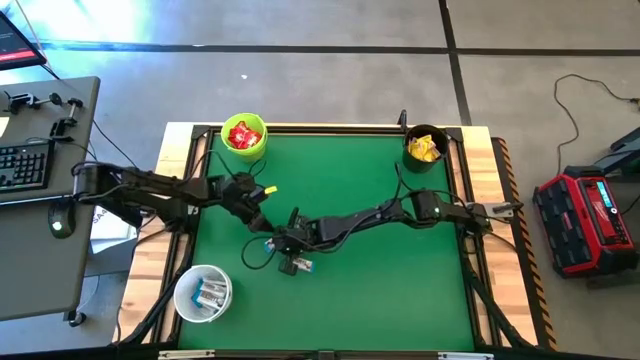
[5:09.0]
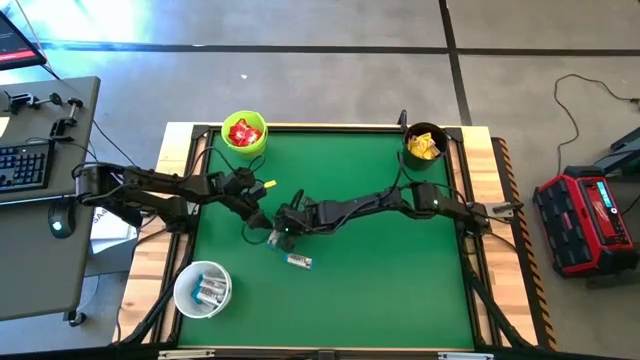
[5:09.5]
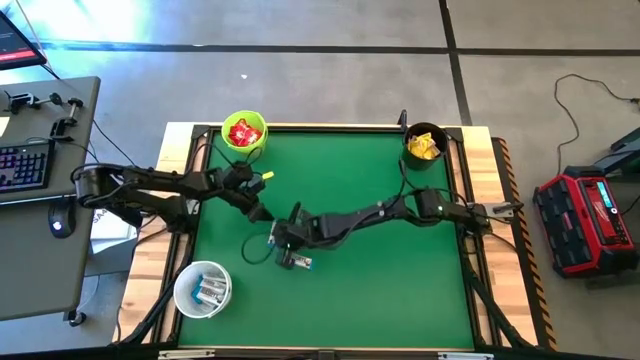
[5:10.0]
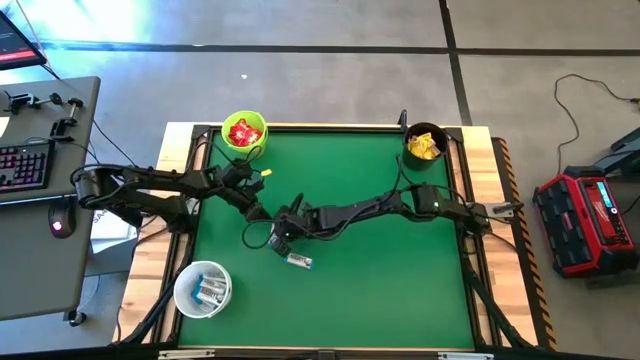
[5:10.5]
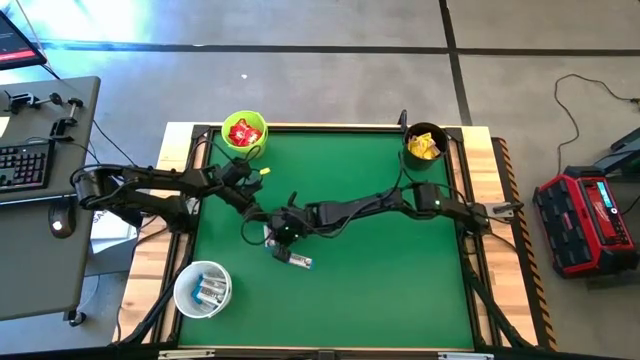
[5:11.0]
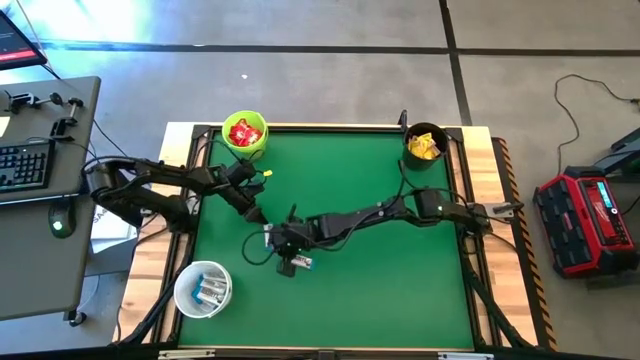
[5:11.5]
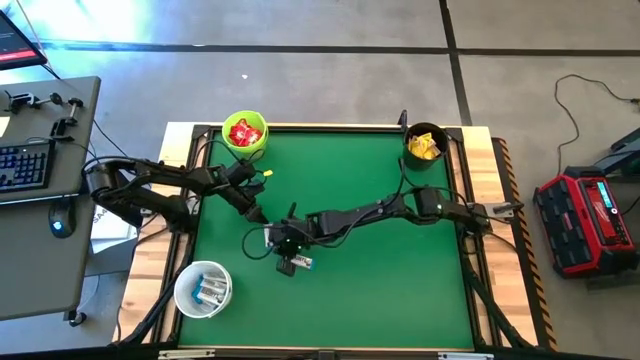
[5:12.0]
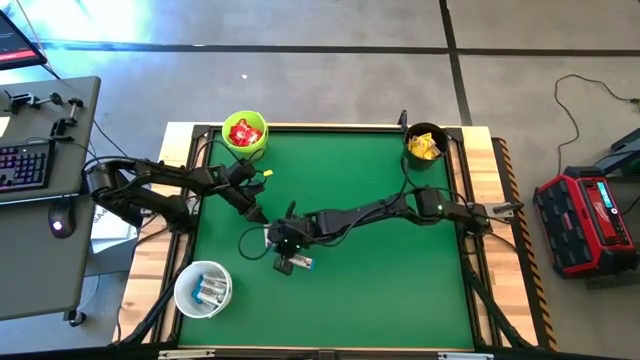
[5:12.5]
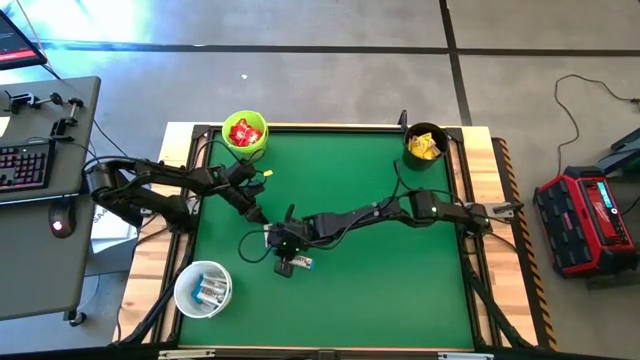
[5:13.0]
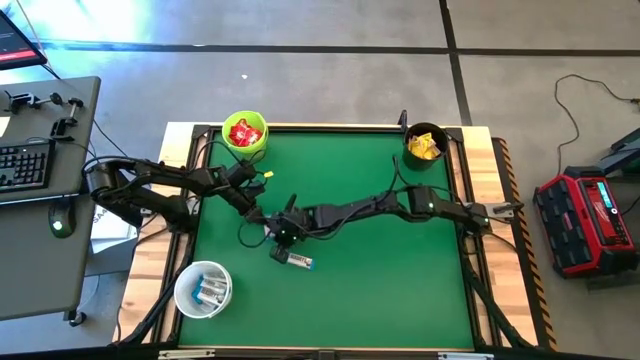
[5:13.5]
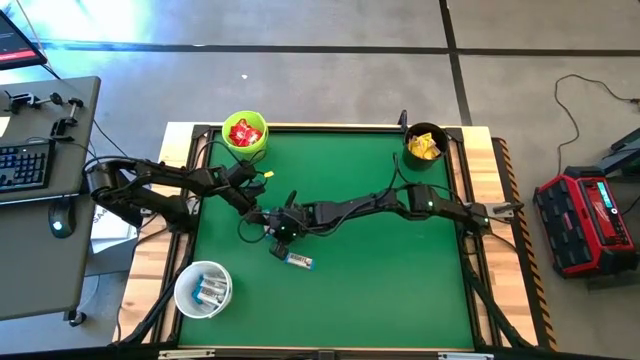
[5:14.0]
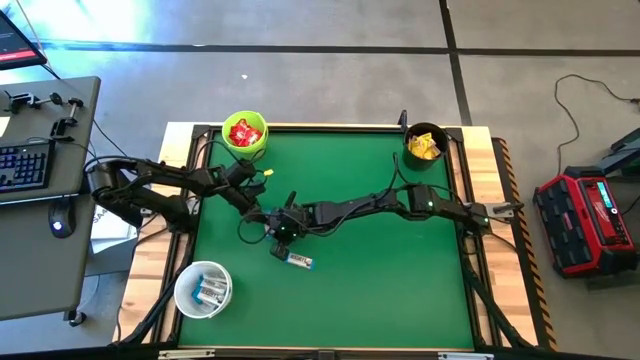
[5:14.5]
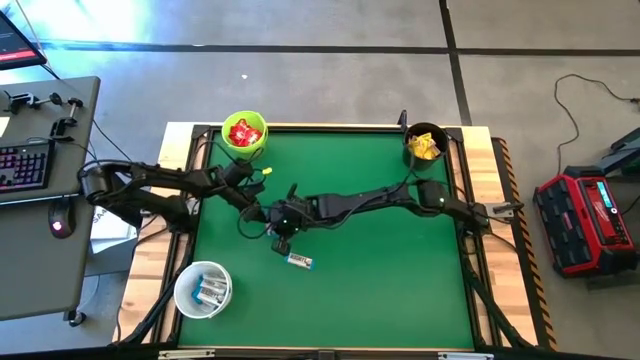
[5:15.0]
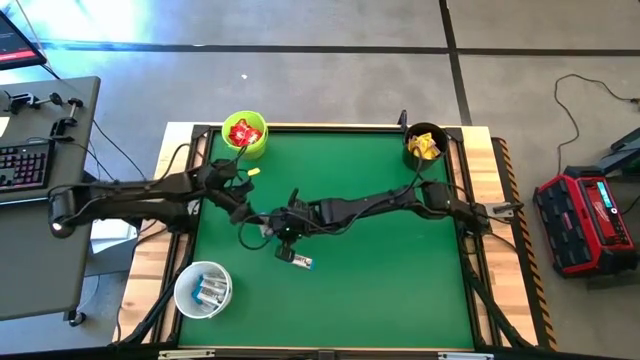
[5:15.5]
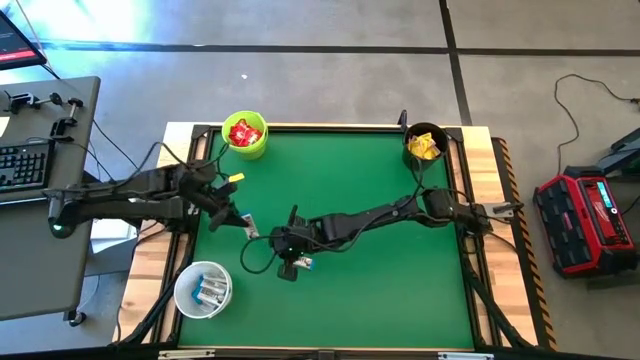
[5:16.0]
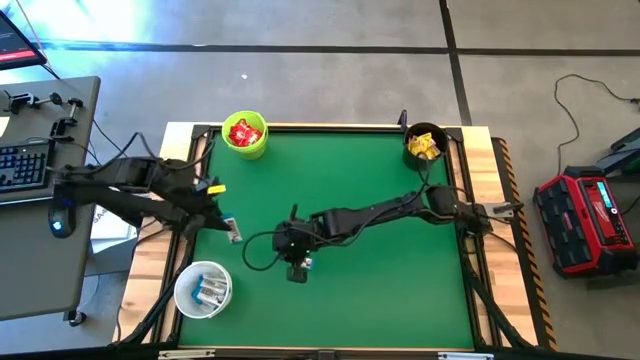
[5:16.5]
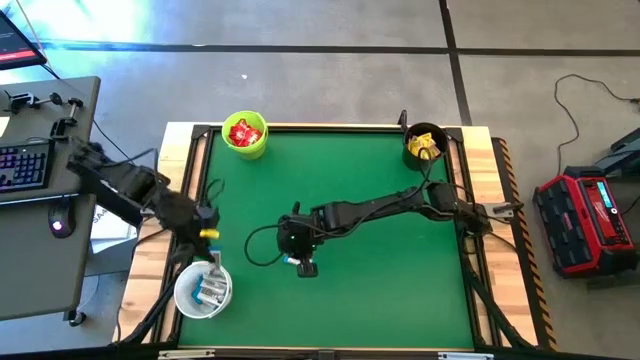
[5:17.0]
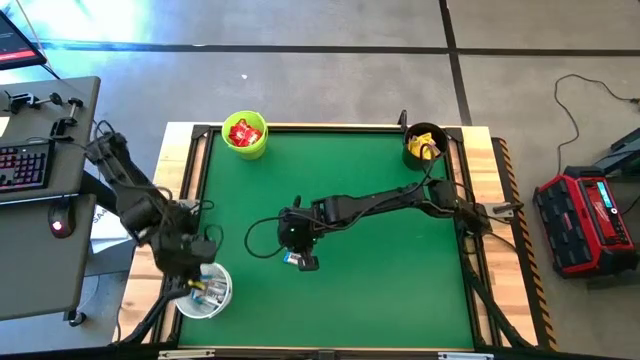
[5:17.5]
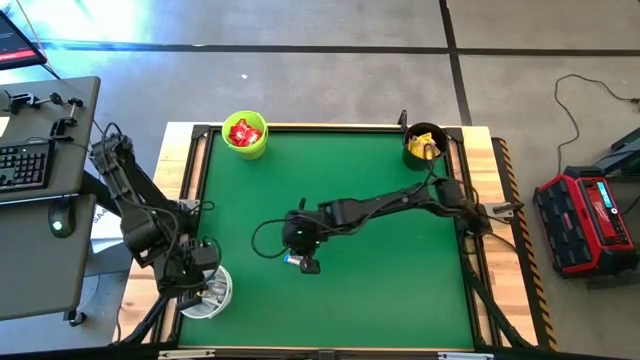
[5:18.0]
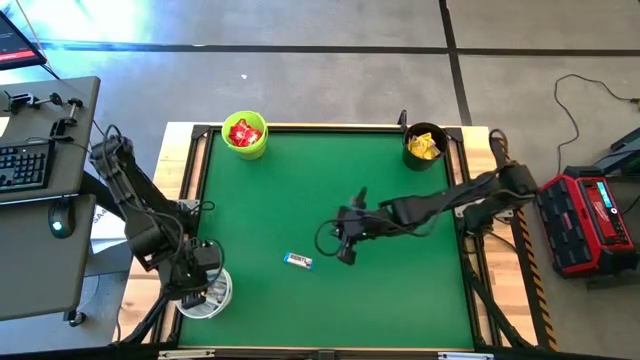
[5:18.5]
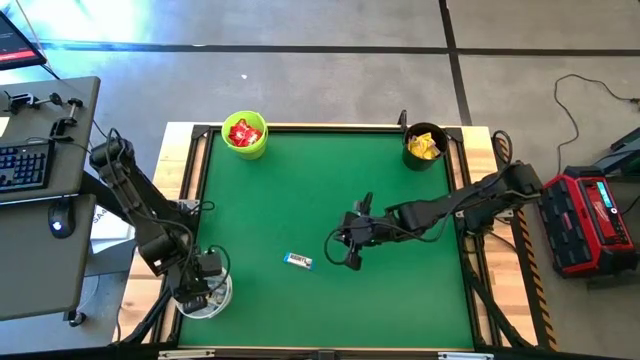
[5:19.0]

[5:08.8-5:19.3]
Task: Sort candy by brand, put in halloween buckets
Put the white chocolate into the white bucket

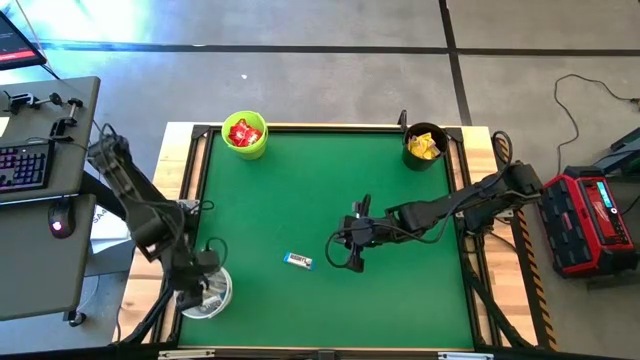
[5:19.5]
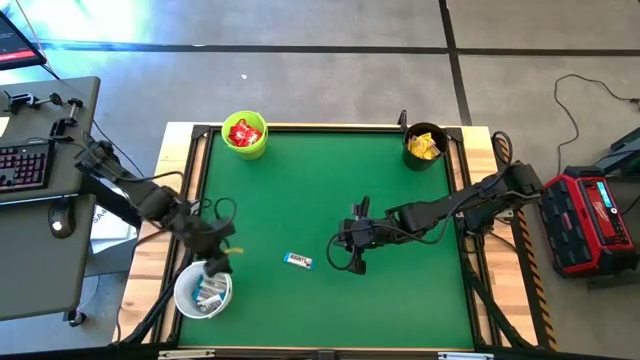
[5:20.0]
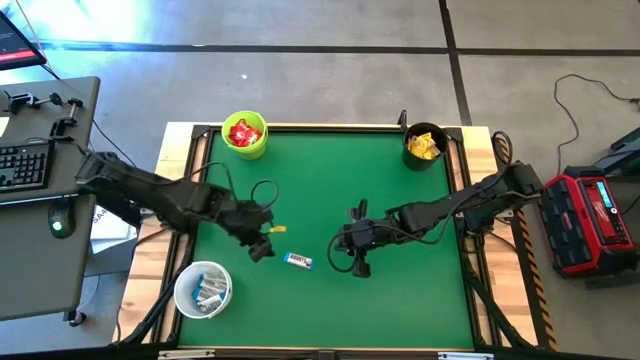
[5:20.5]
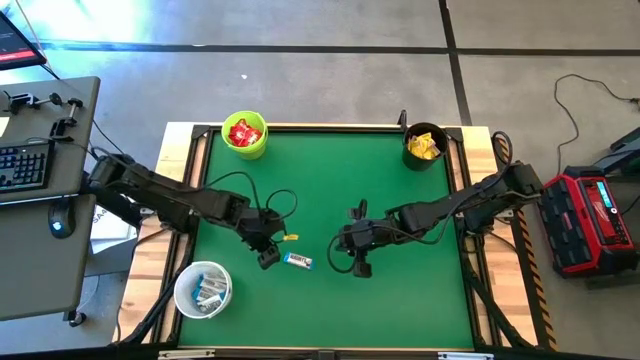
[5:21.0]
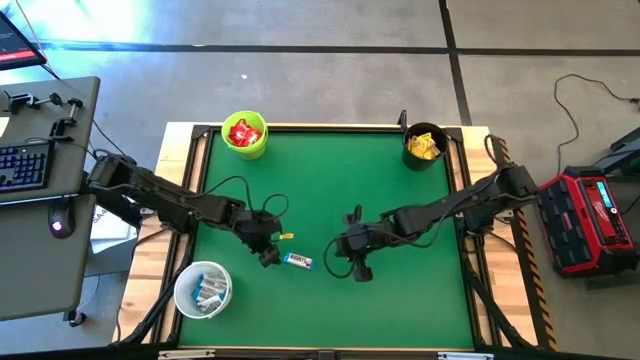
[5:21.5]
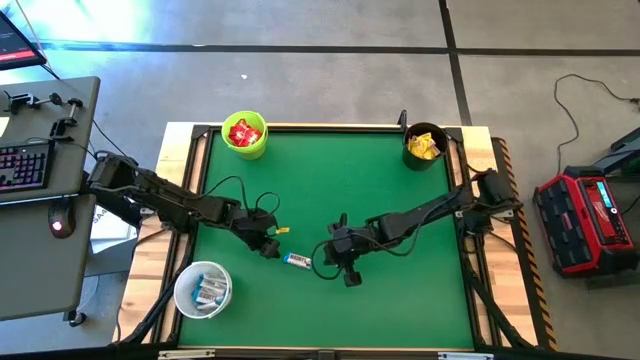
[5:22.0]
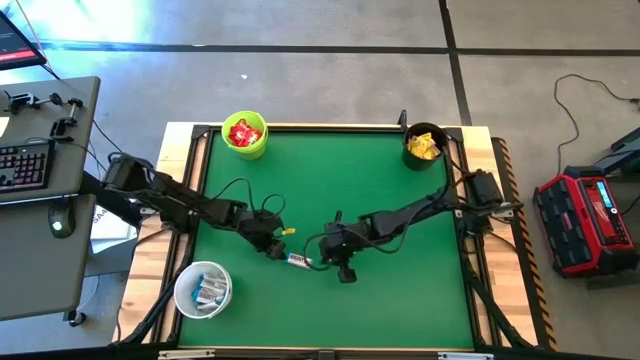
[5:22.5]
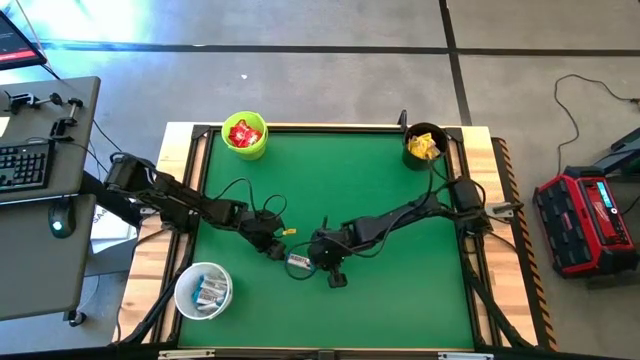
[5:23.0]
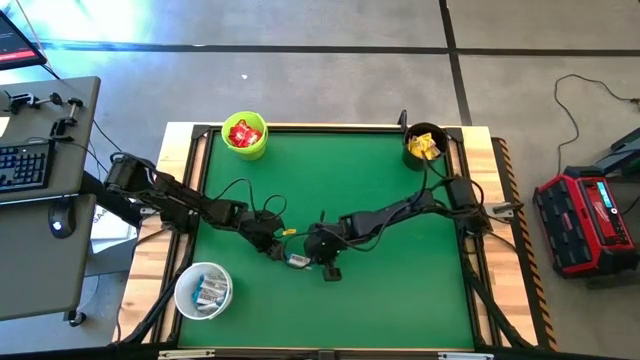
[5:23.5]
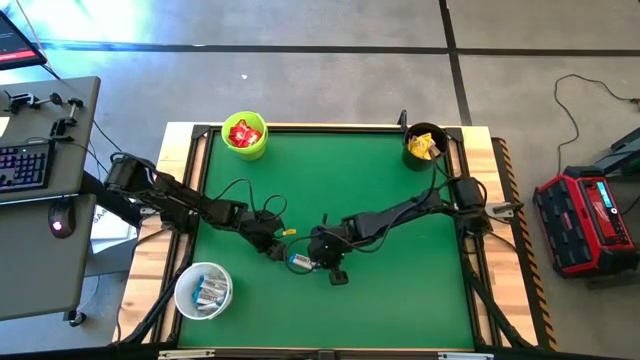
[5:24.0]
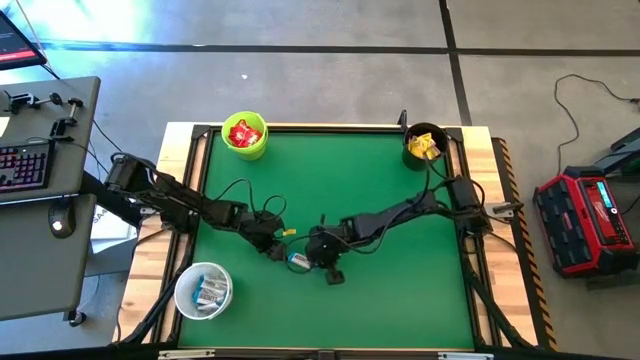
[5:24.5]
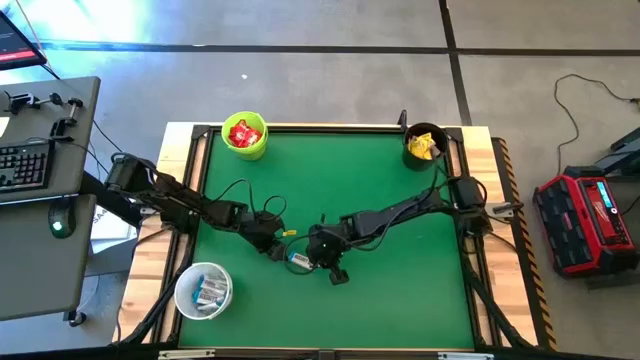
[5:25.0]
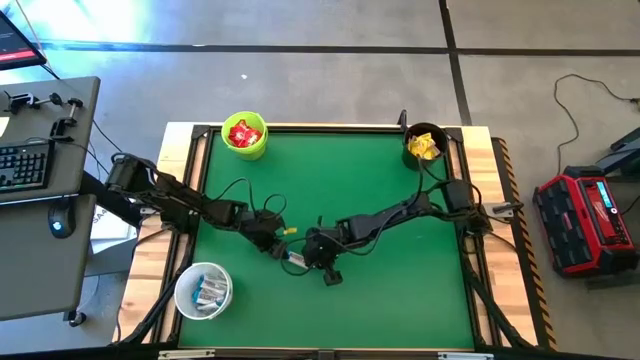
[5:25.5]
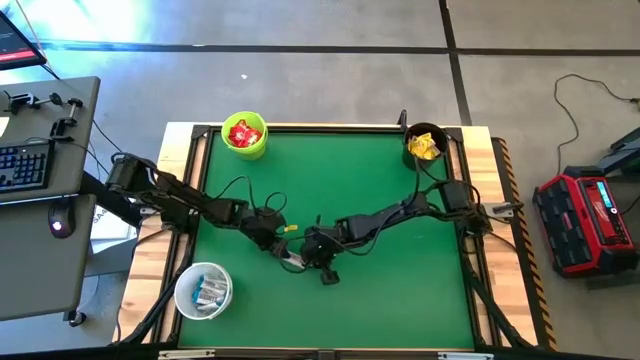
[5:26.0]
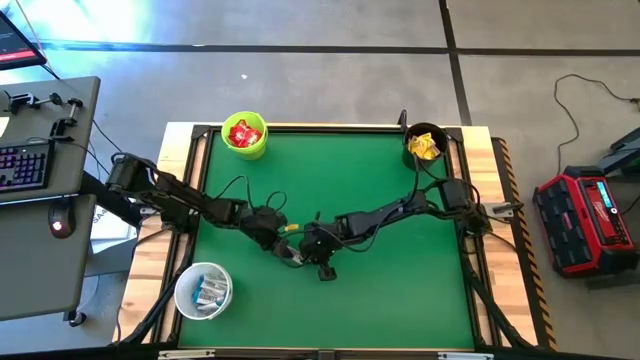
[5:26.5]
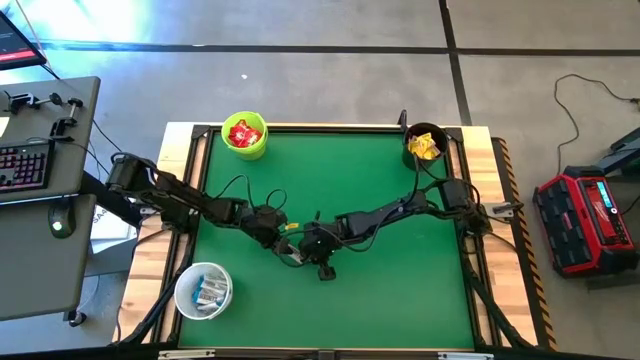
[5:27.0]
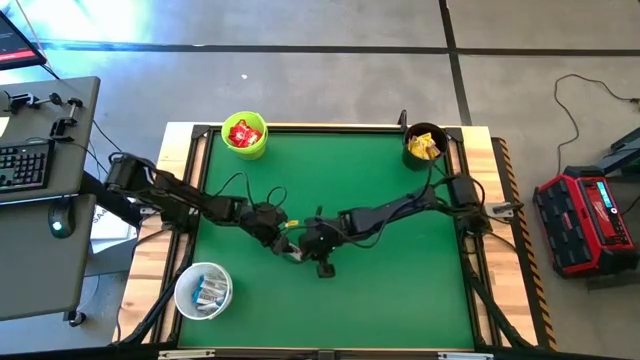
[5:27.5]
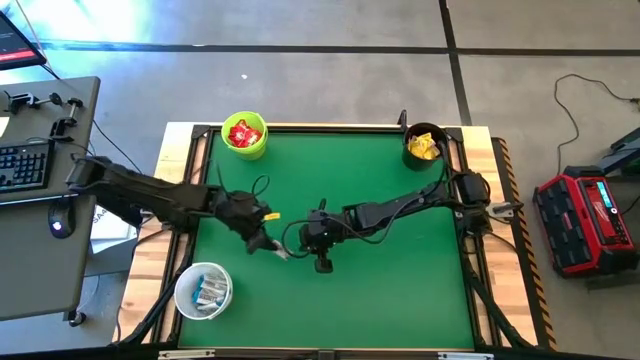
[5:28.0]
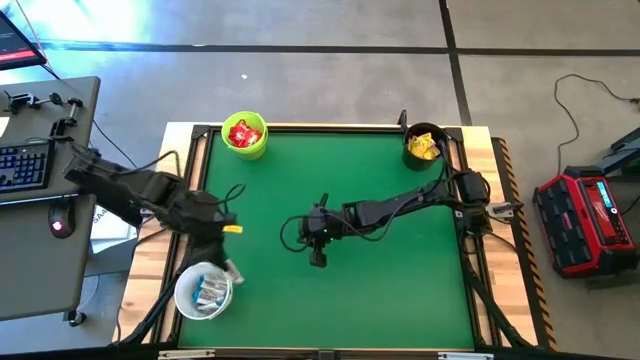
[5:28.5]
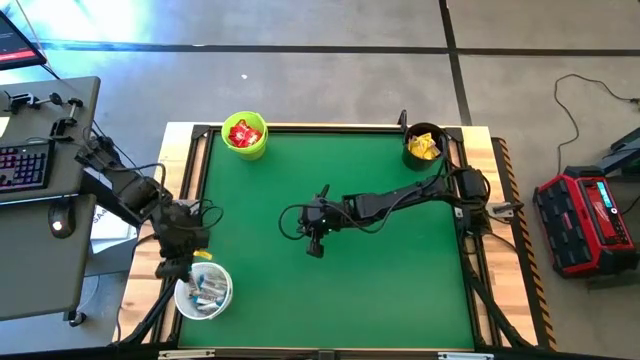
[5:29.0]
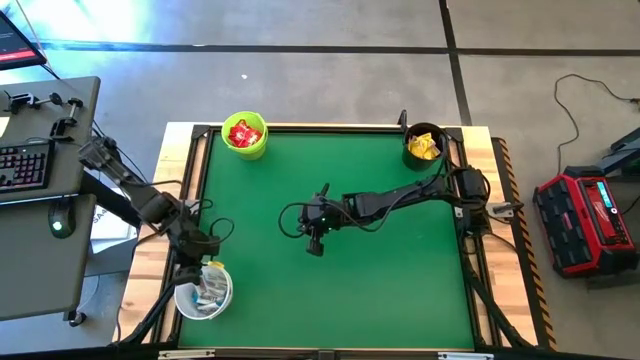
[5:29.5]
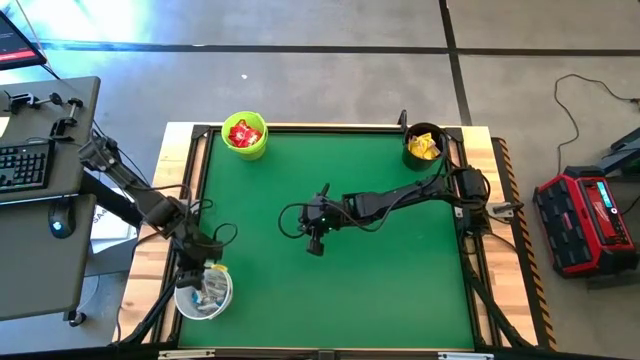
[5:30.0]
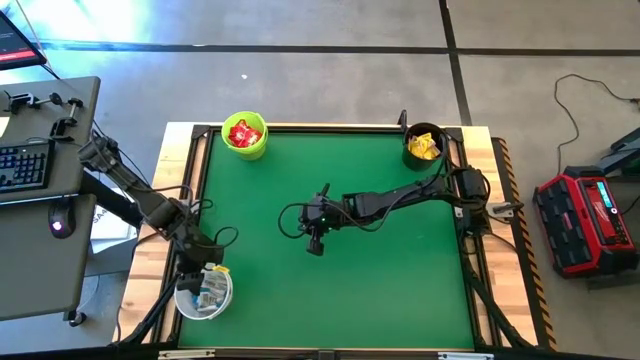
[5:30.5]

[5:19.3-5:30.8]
Put the white chocolate into the white bucket
